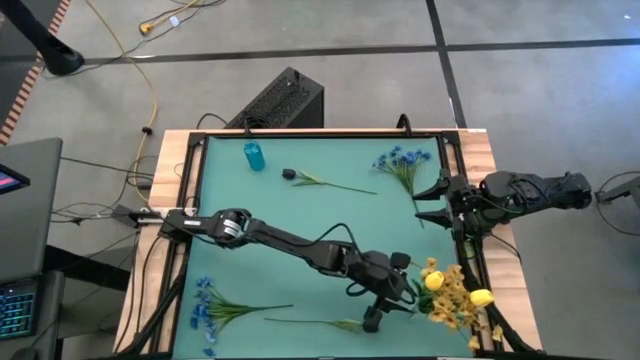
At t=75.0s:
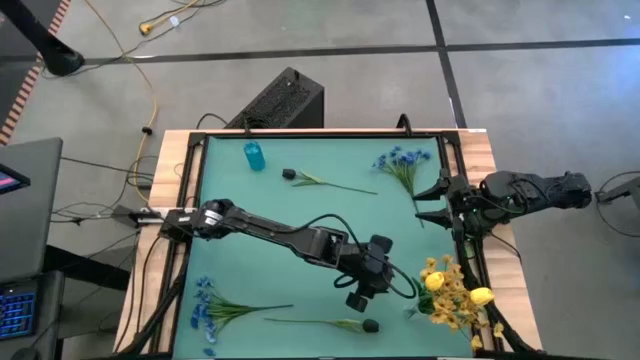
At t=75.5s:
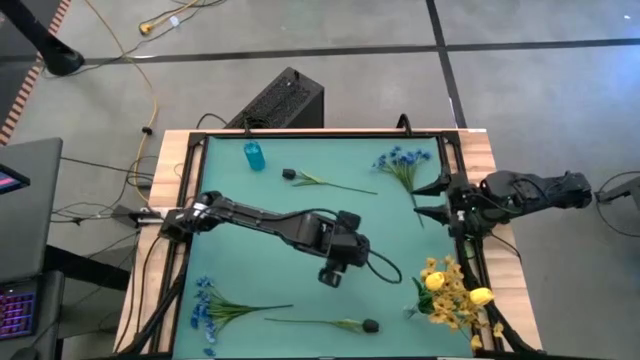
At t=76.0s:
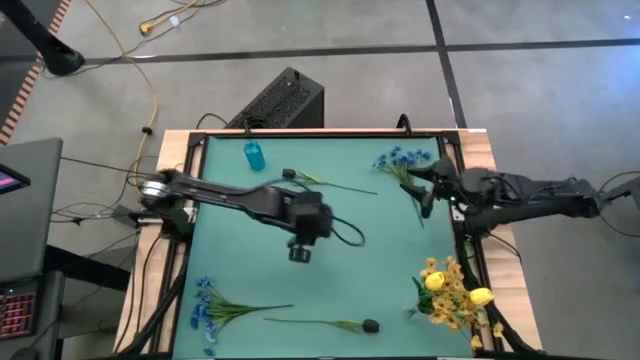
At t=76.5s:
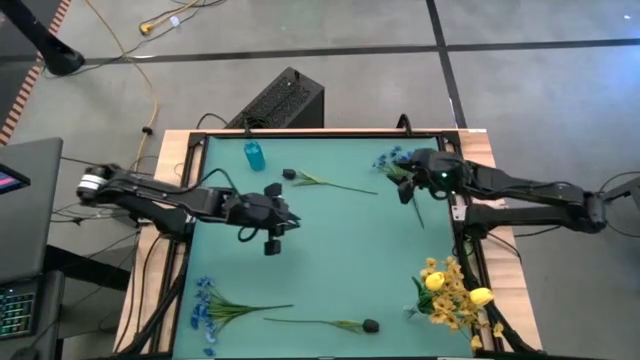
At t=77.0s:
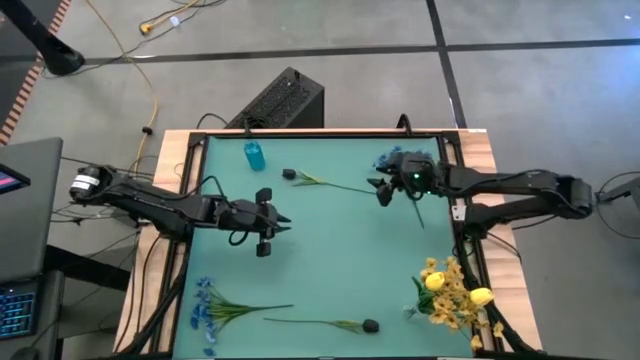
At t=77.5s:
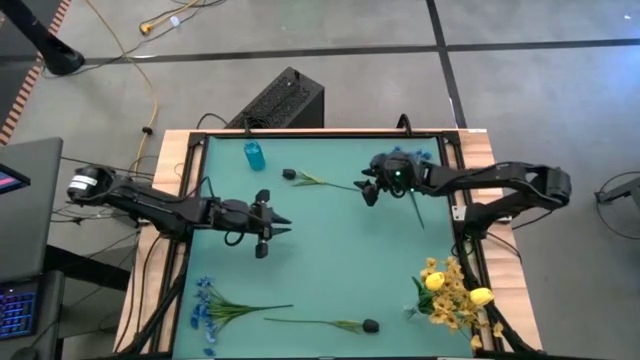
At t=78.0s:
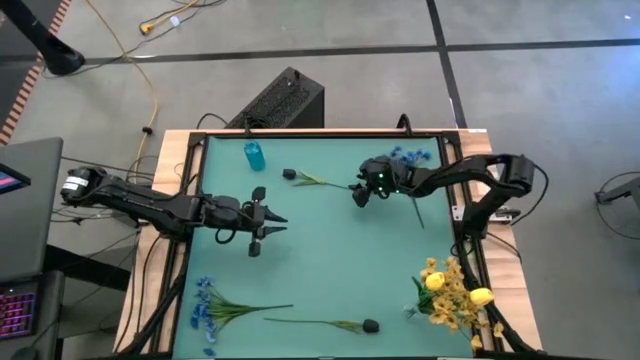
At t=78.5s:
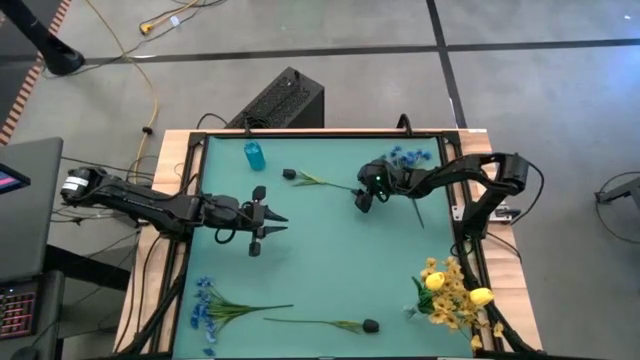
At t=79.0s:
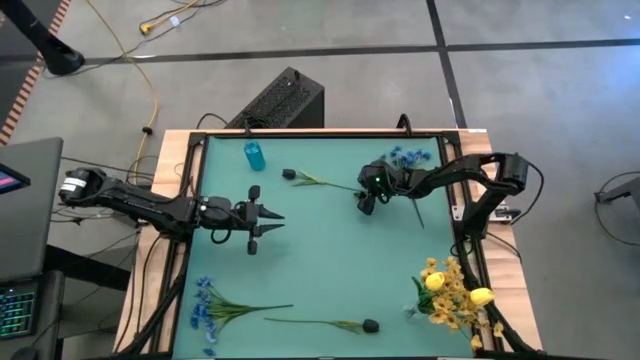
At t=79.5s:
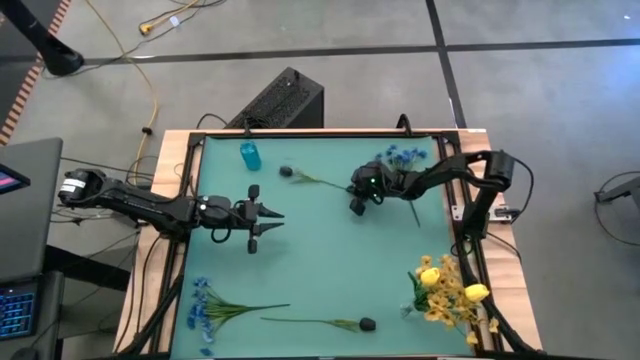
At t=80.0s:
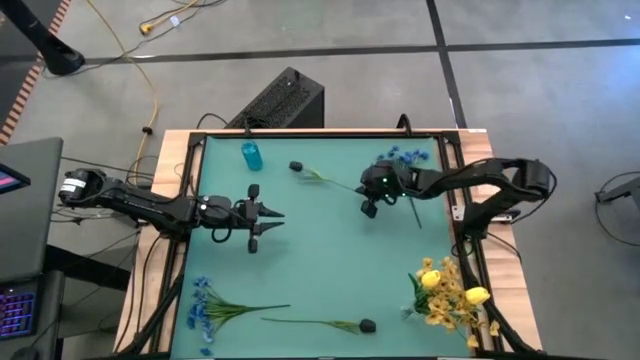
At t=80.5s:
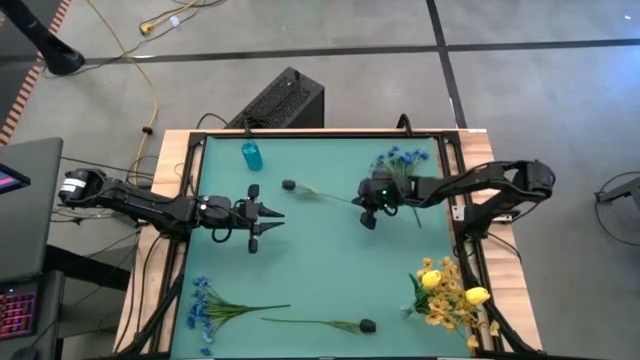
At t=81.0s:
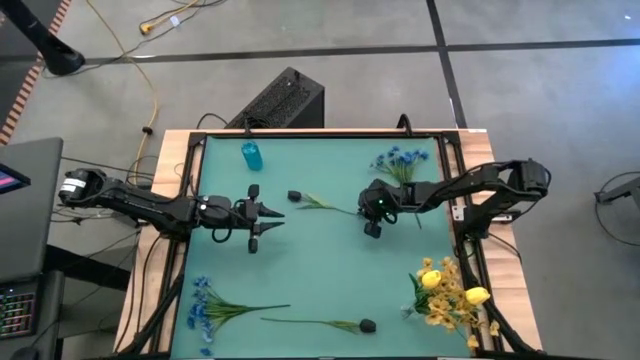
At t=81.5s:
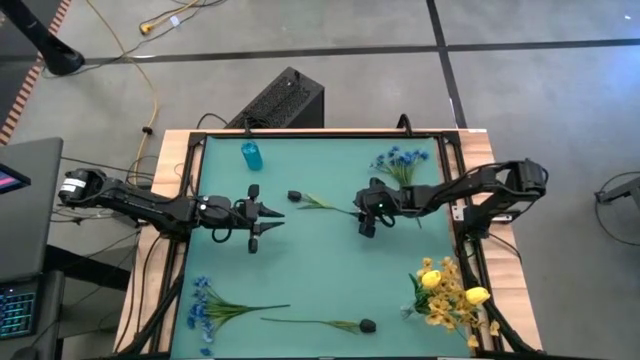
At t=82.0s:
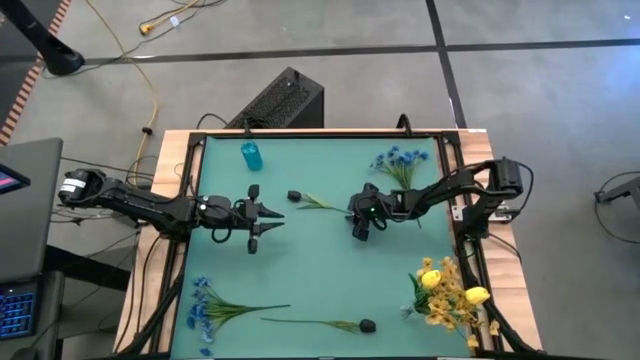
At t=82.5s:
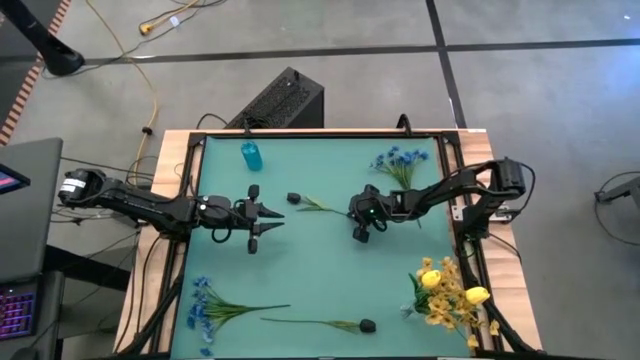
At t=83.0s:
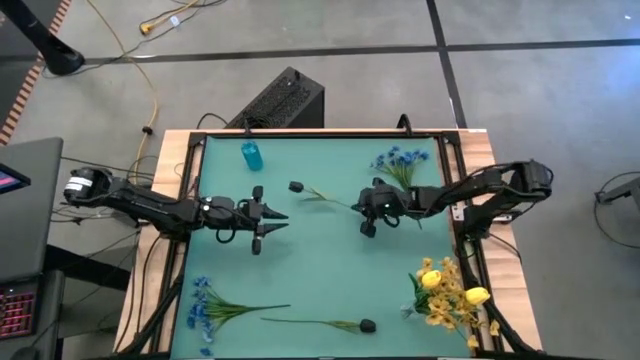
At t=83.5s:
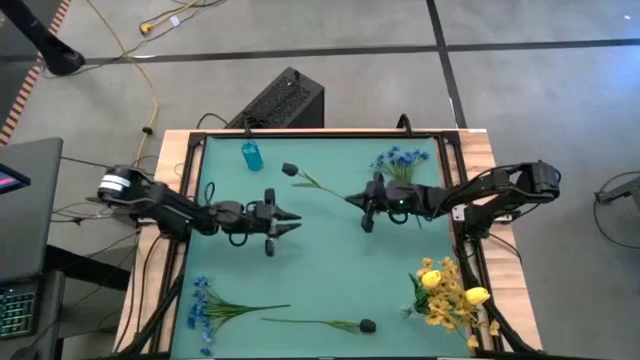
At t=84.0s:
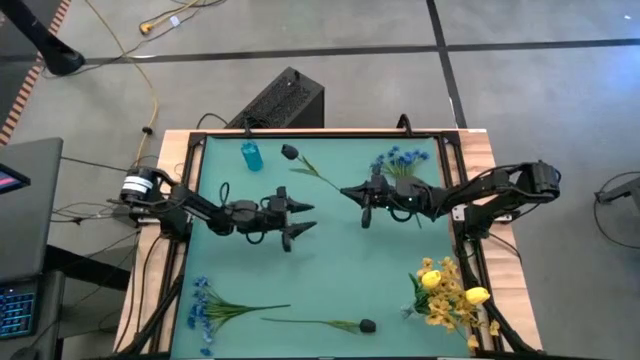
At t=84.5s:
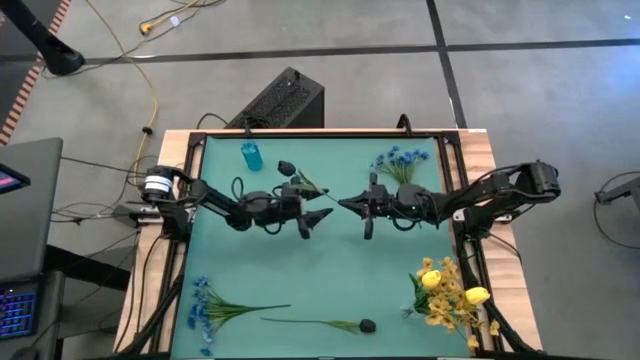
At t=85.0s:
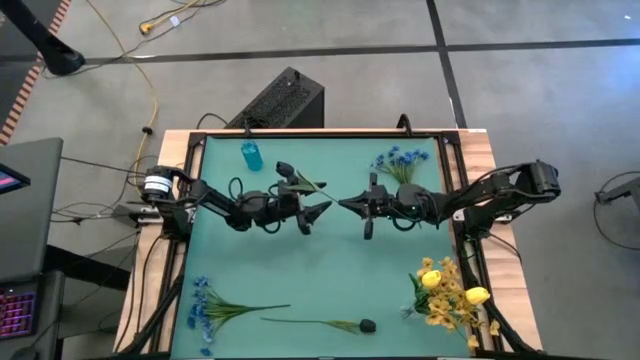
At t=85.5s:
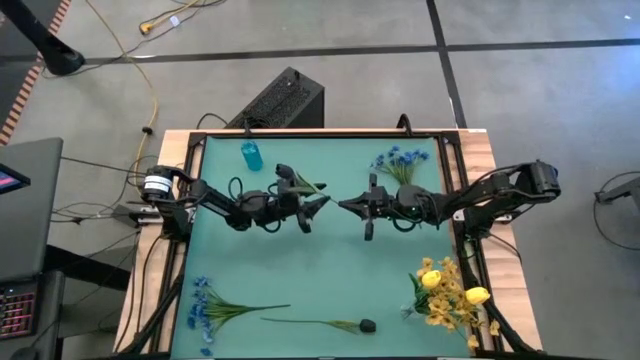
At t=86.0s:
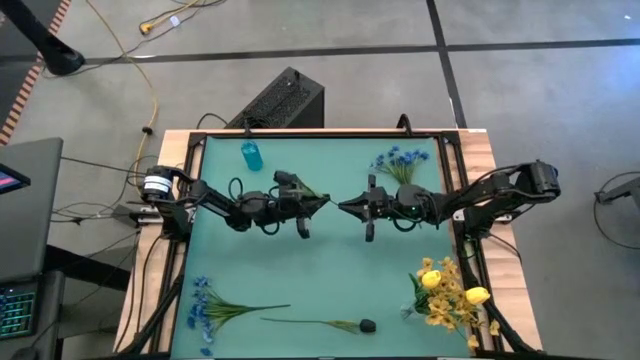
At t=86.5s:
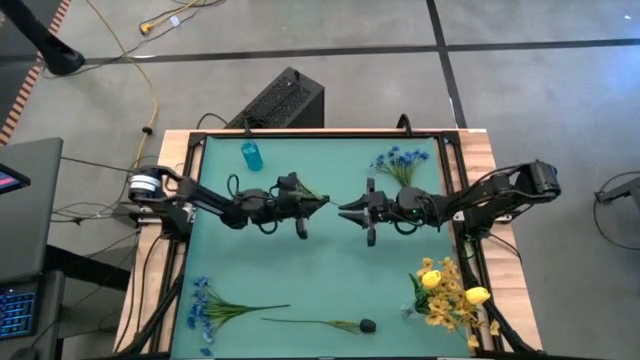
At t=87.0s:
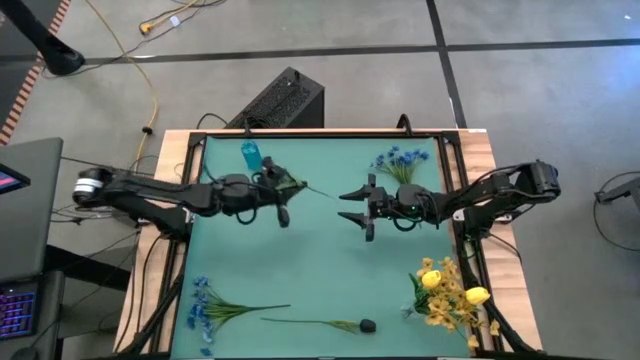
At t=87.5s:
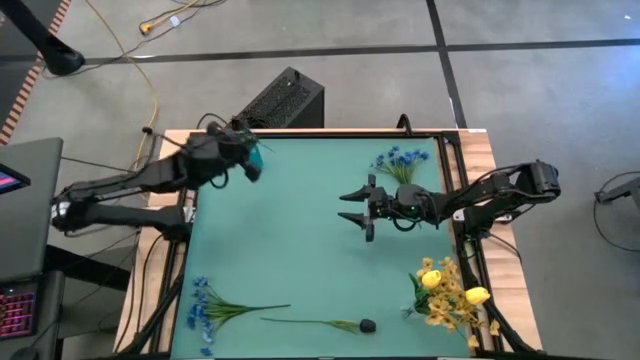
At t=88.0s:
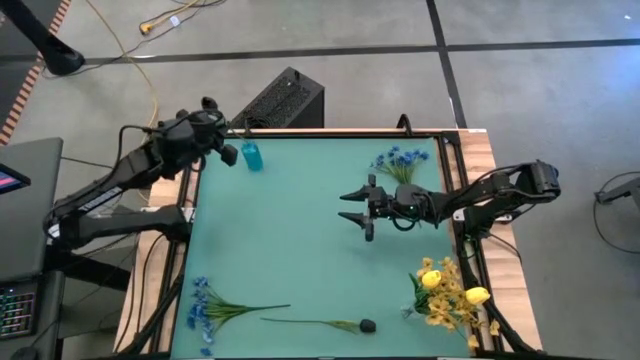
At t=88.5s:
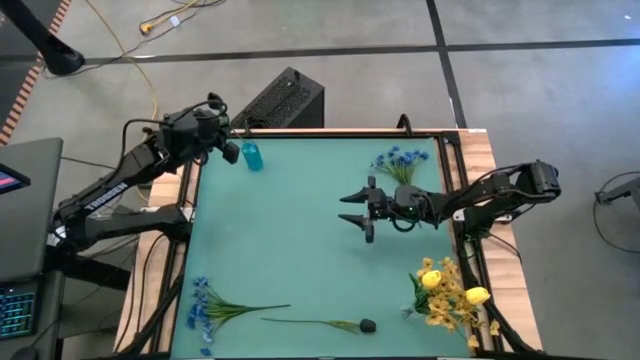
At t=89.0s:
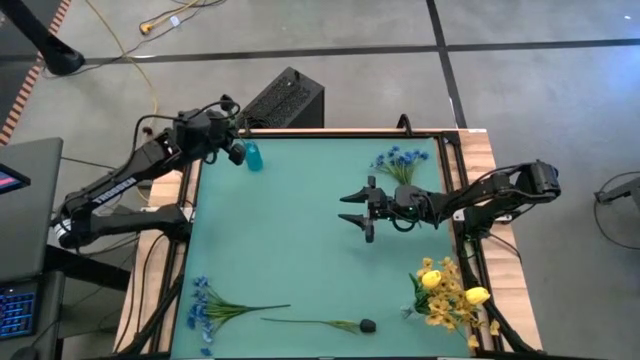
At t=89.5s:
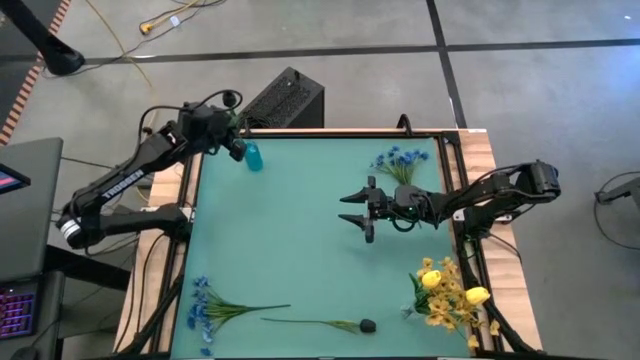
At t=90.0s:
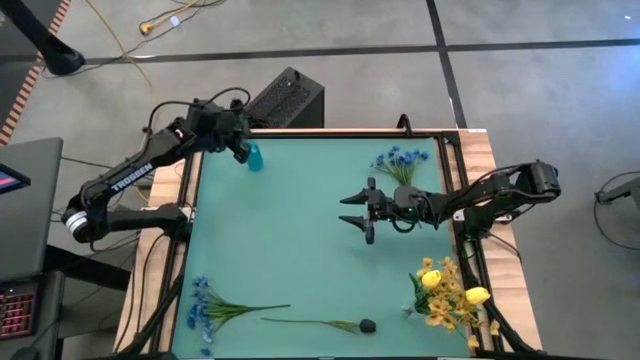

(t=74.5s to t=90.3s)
Task: Sort flowers into vase by color
Put the top black tulip into the blue vase

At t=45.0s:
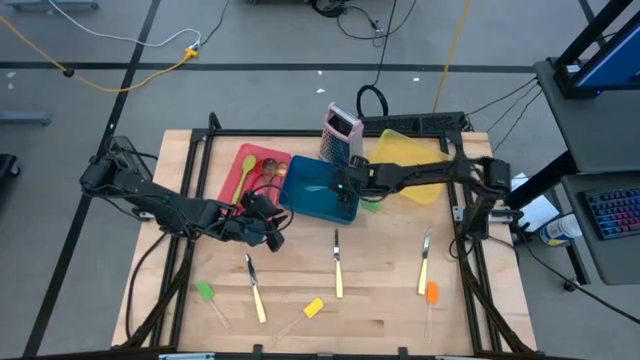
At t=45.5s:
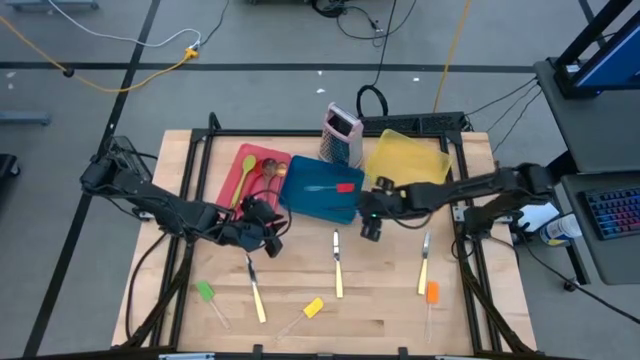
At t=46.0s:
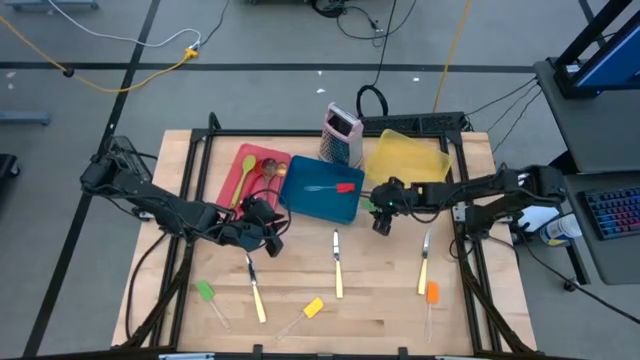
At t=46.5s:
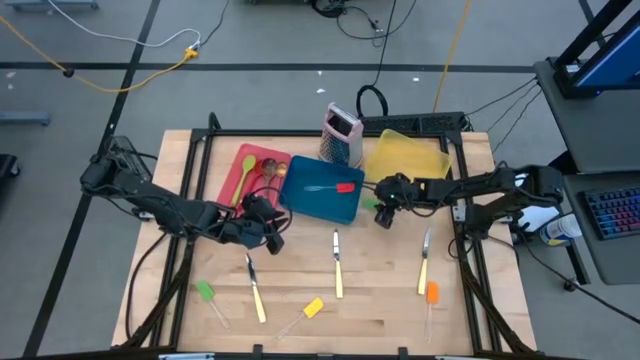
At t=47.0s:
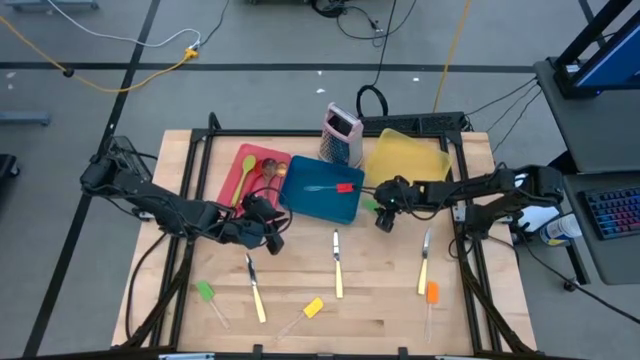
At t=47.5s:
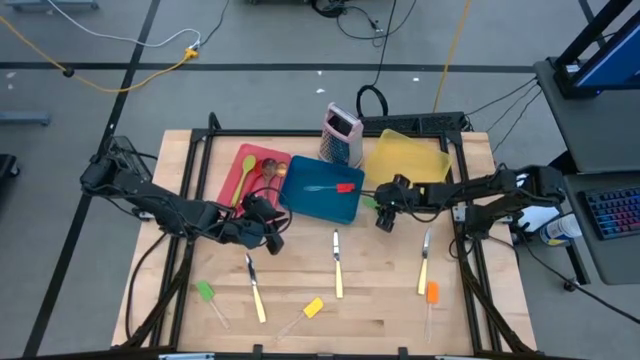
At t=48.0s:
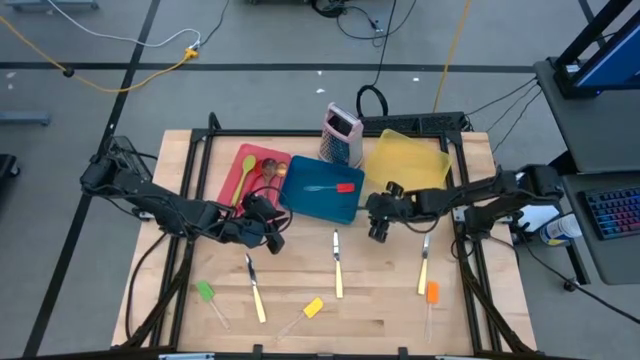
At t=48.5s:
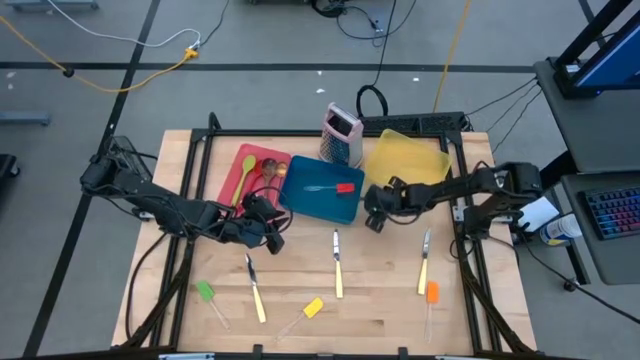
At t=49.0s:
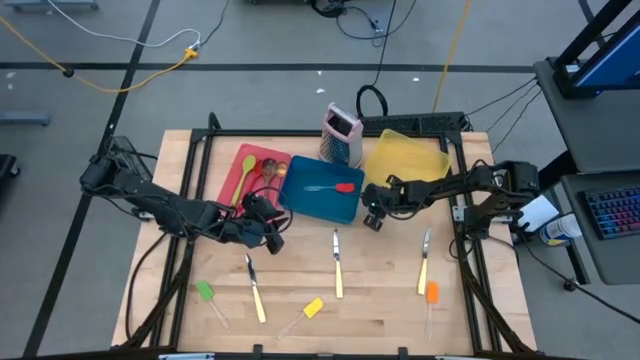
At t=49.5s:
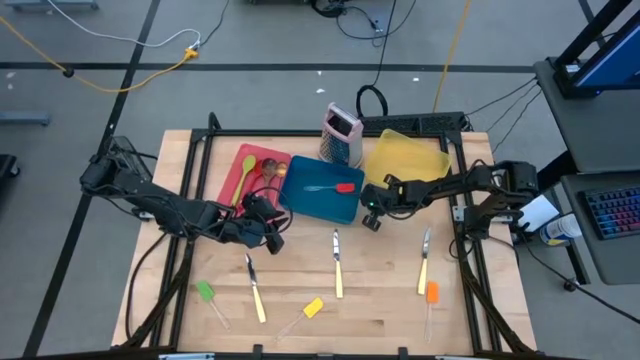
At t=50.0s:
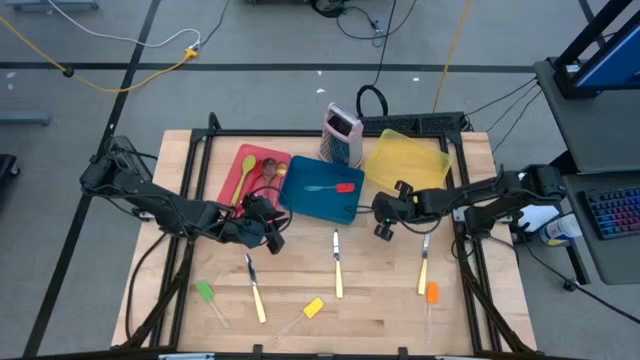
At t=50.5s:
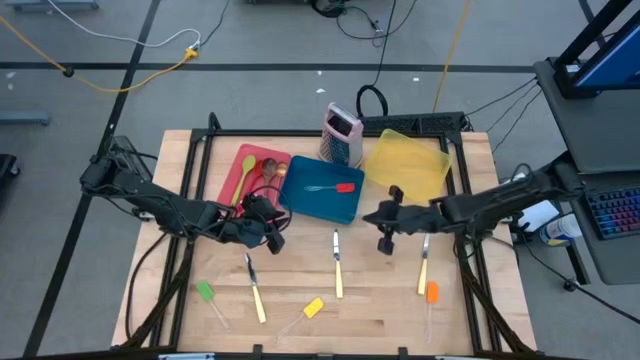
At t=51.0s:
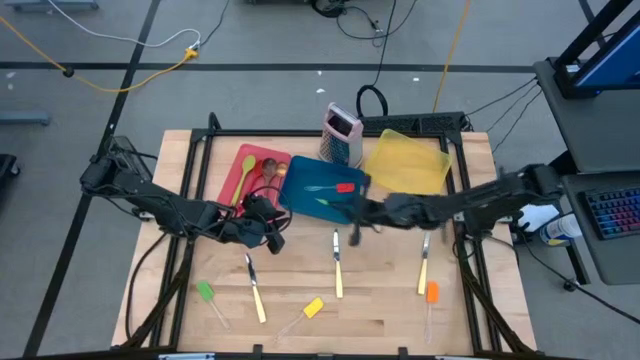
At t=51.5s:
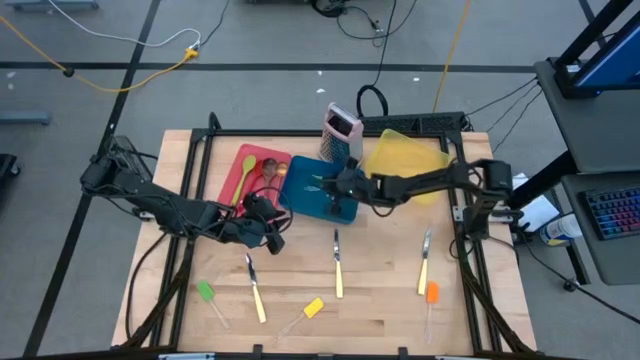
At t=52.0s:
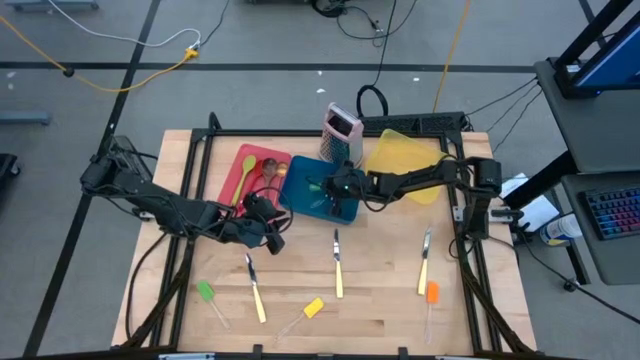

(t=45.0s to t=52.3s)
Task: Pick & Place Kitchen Items
Put the right green spatula into the blue bin
